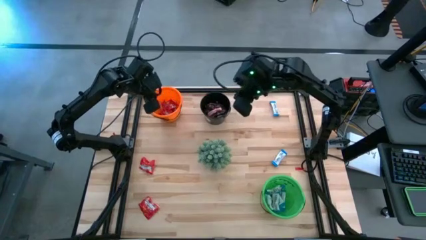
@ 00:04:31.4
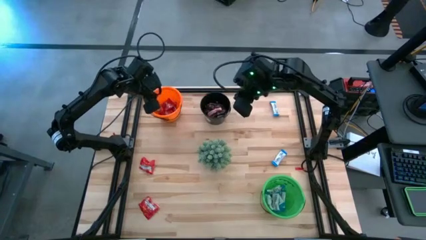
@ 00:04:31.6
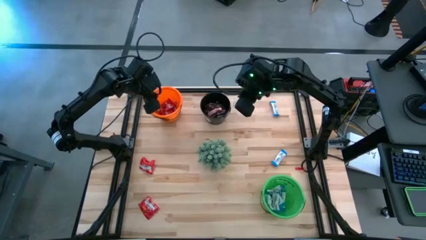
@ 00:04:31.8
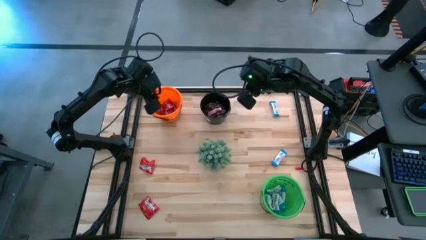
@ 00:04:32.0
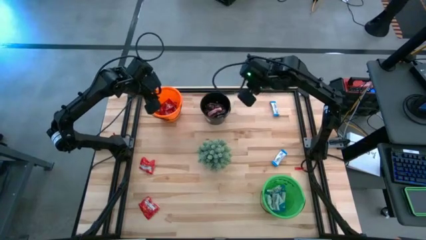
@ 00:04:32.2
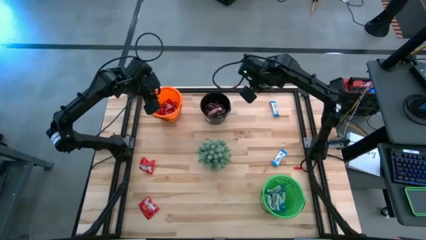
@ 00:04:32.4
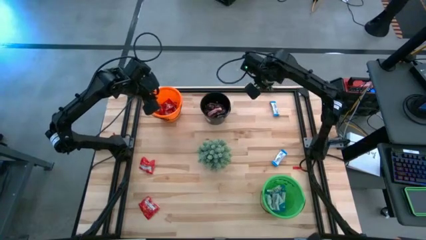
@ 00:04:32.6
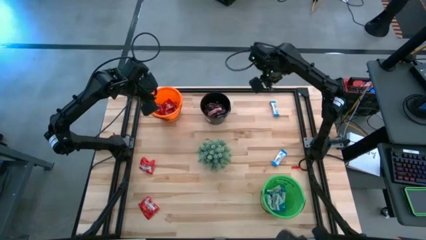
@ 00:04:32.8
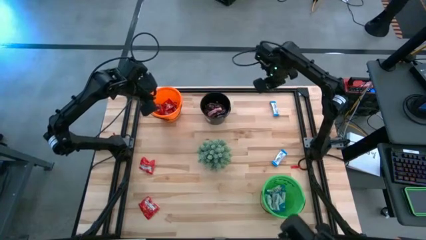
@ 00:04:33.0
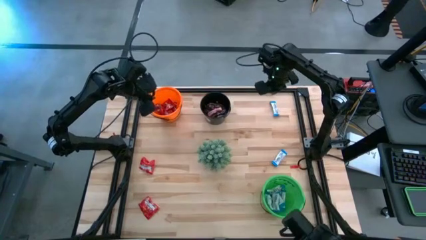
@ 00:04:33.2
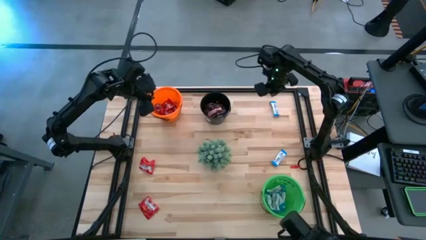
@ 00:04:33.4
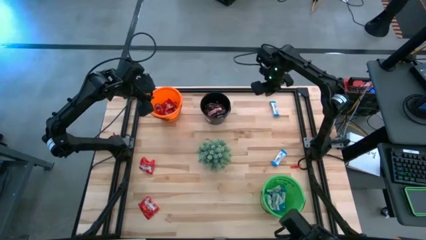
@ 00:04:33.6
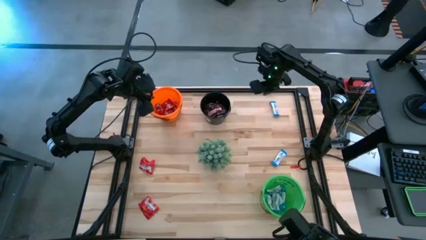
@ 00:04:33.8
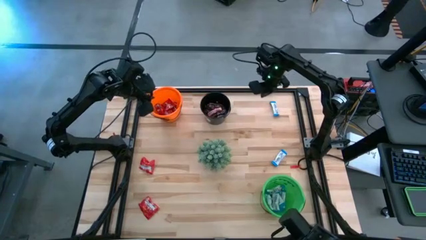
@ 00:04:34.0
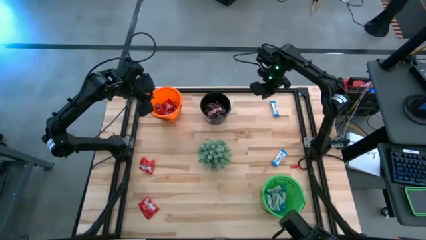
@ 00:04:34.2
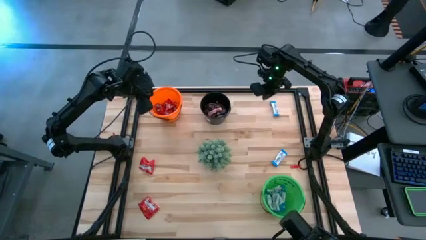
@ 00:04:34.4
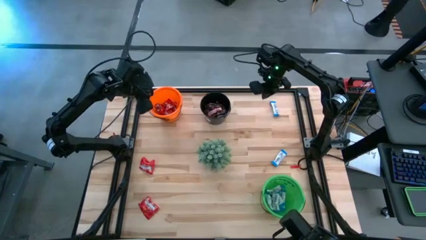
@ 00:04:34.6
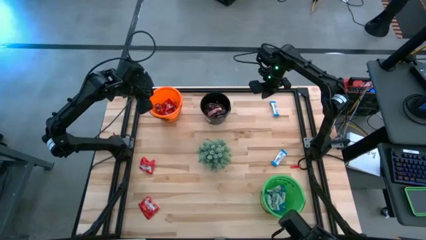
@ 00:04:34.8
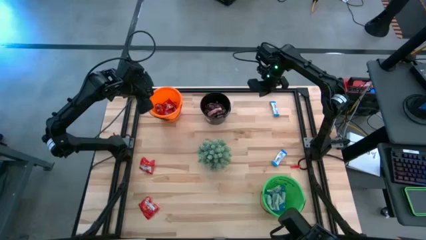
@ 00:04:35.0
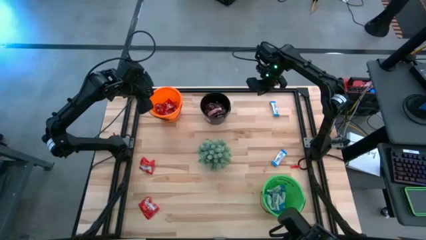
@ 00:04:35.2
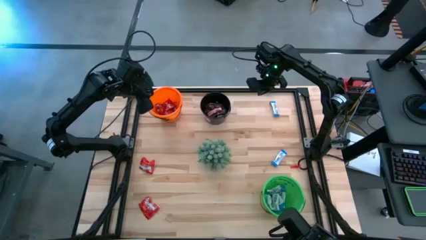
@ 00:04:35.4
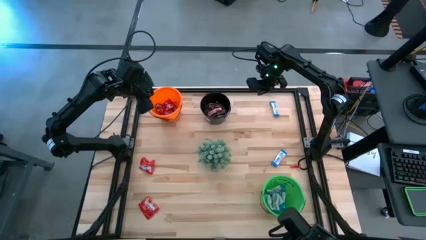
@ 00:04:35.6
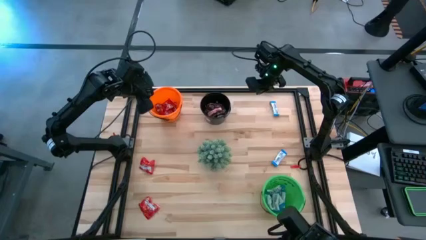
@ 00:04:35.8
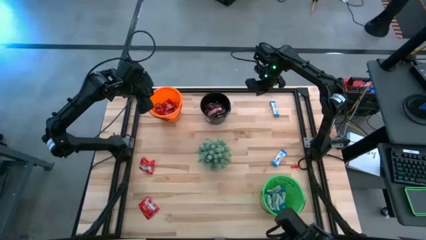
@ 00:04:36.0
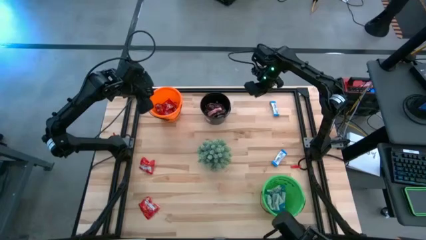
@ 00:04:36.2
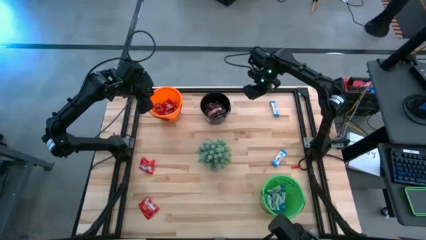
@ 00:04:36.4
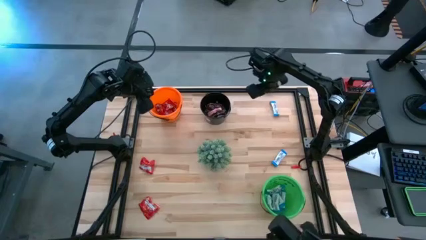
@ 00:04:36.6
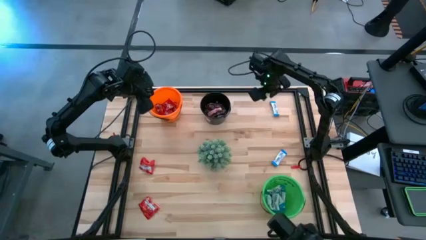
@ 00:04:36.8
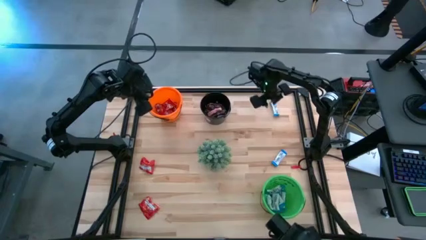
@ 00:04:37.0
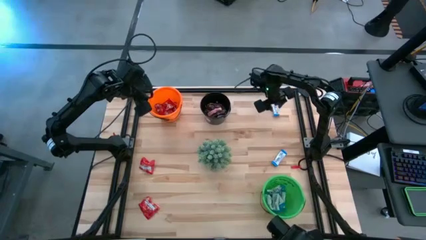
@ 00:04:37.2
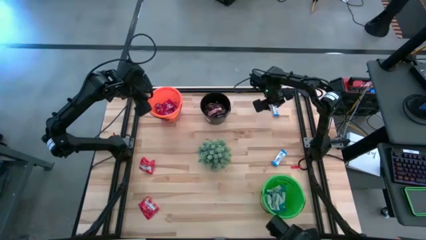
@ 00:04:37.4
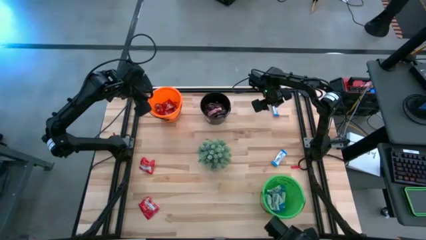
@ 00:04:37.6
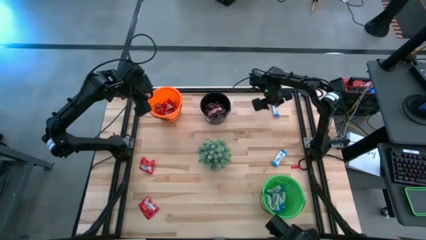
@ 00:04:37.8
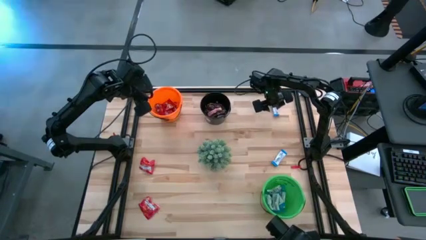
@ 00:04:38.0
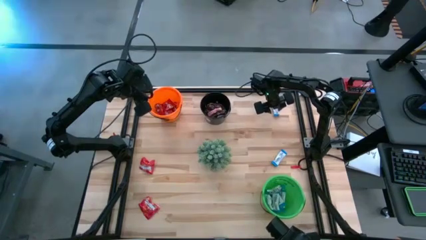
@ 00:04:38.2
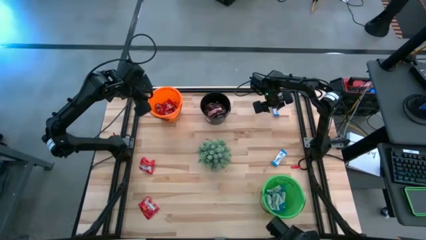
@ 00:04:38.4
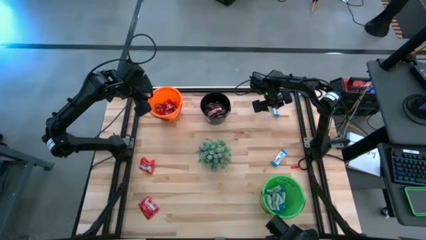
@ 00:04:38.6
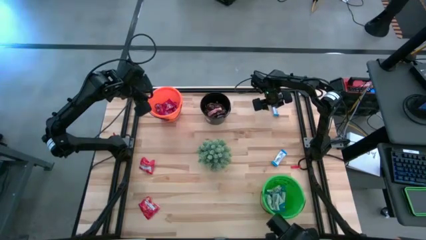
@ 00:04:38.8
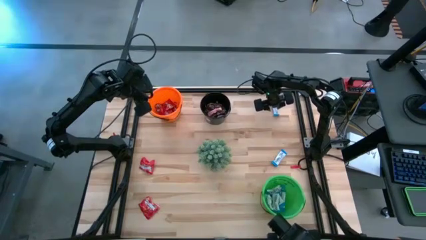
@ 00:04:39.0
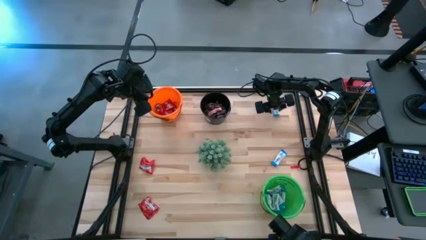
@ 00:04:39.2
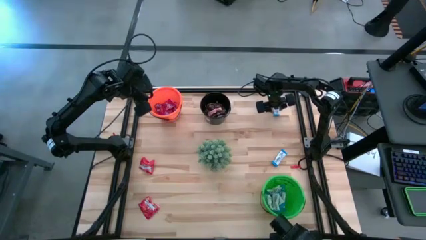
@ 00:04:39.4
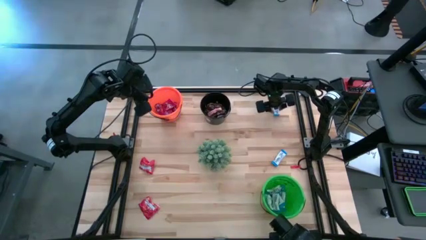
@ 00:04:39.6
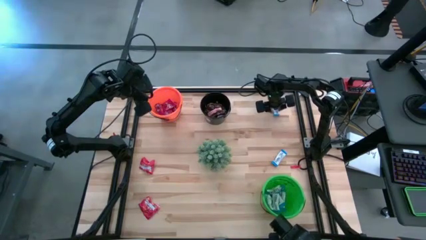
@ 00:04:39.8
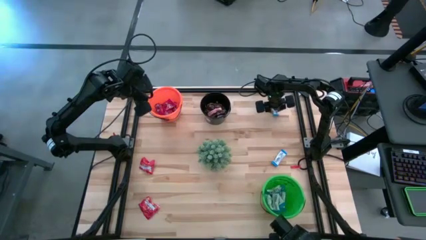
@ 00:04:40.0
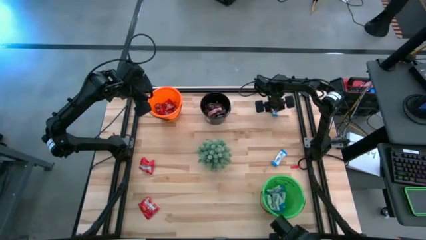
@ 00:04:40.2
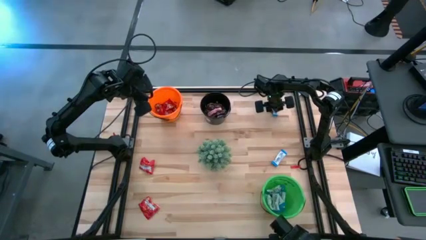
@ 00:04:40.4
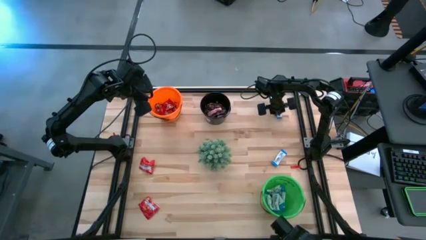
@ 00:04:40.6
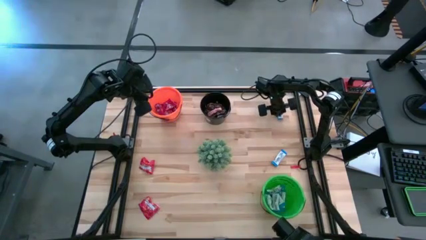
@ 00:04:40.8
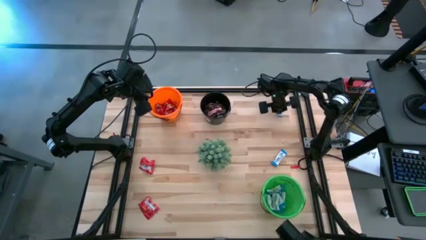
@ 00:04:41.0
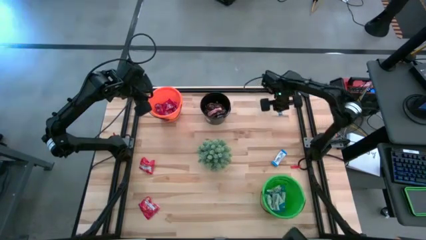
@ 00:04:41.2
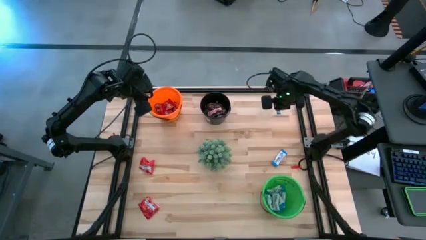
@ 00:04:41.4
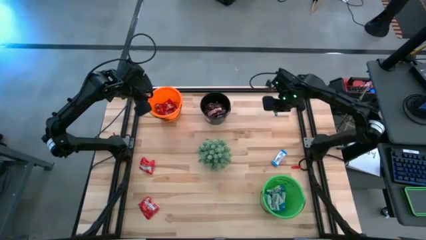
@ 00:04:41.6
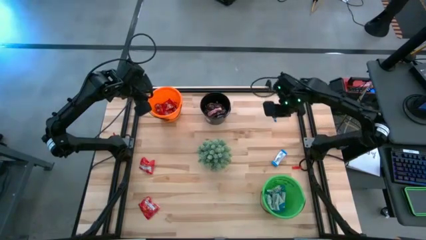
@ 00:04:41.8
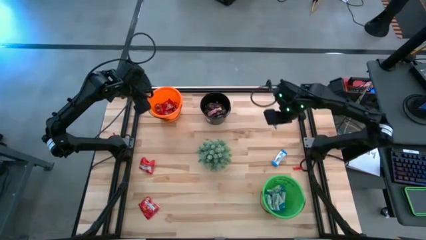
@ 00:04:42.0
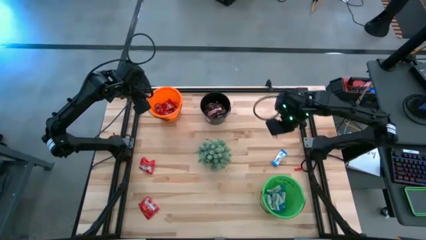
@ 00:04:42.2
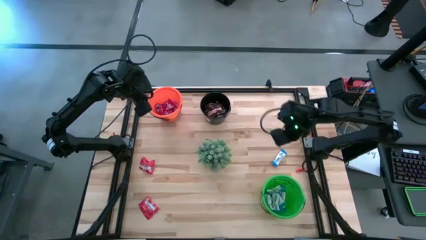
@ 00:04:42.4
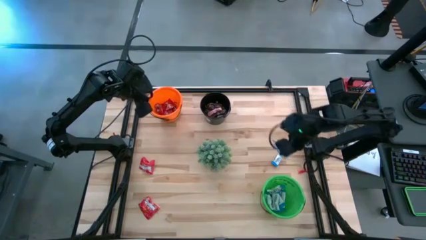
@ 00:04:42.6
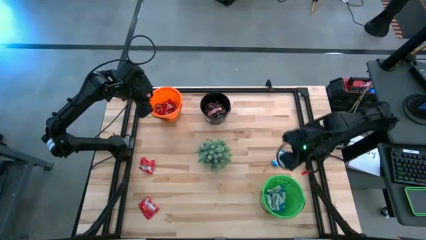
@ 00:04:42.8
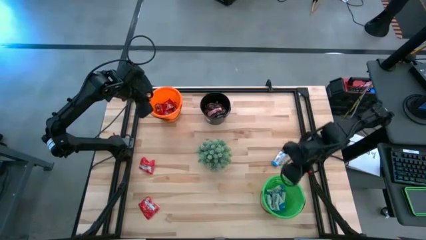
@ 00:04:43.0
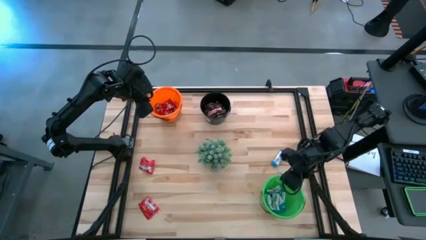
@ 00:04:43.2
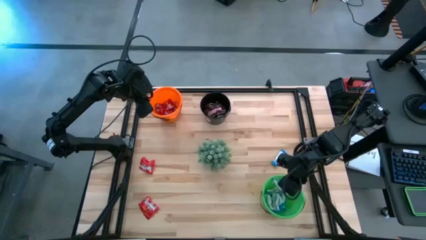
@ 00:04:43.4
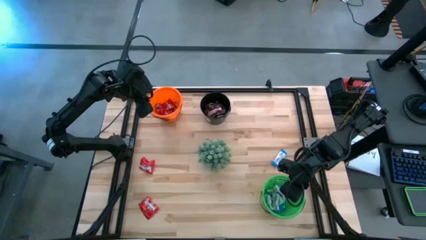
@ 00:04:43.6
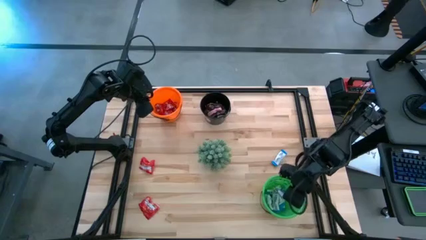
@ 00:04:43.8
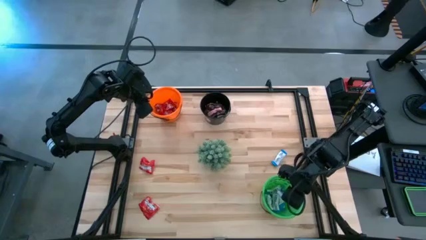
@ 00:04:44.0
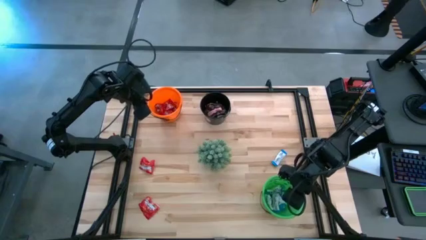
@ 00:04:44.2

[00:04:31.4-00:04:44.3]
Task: Sort candy
Put the blue chocolate into the green bucket
